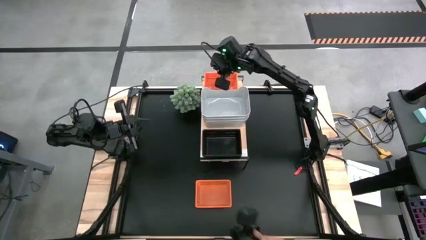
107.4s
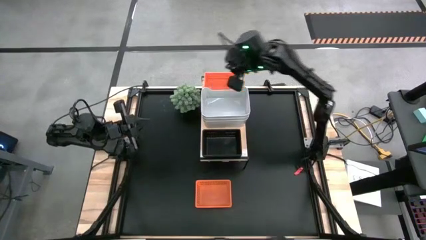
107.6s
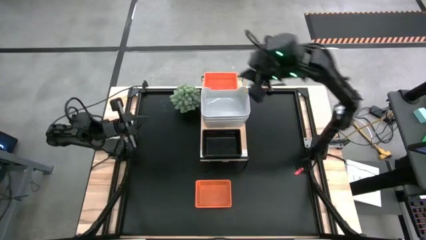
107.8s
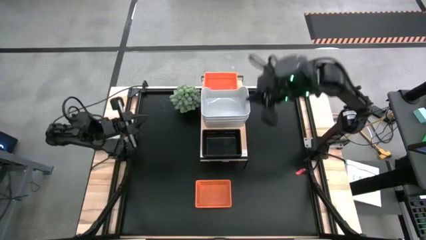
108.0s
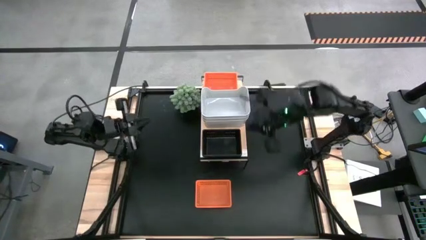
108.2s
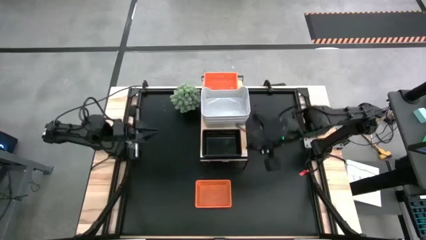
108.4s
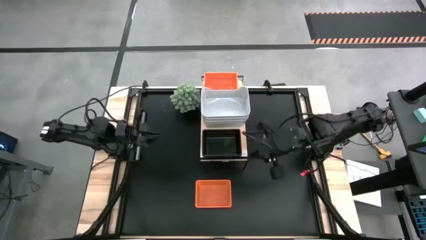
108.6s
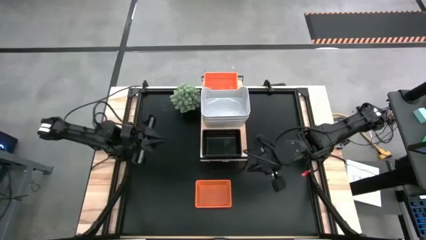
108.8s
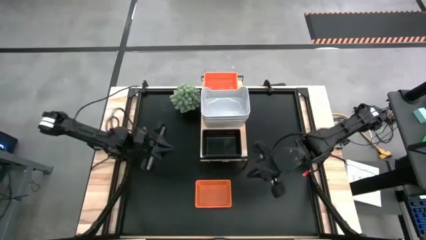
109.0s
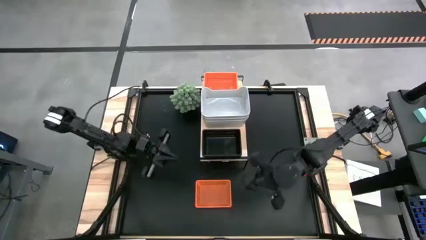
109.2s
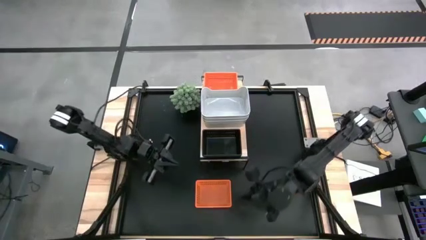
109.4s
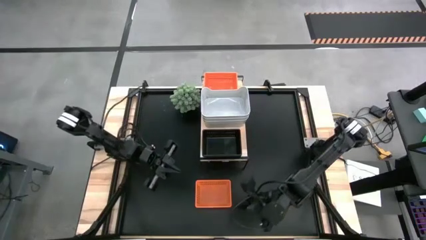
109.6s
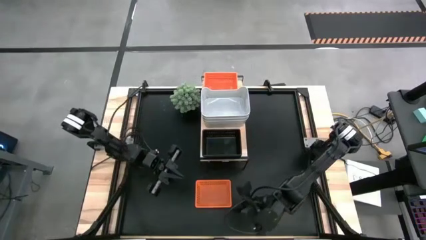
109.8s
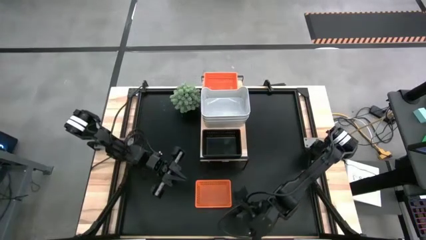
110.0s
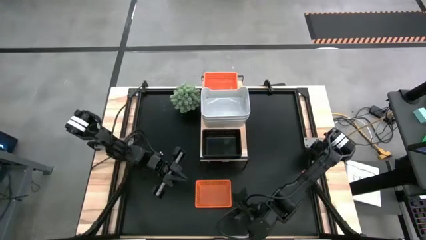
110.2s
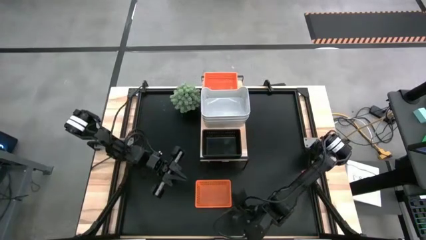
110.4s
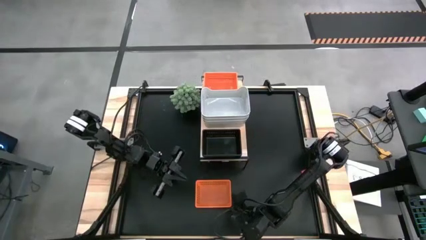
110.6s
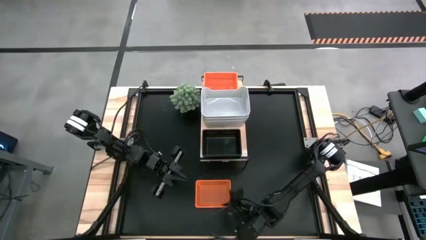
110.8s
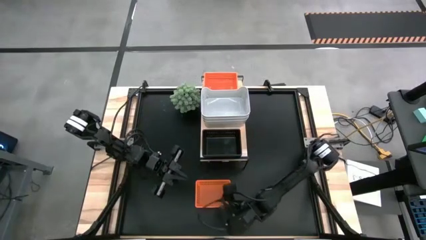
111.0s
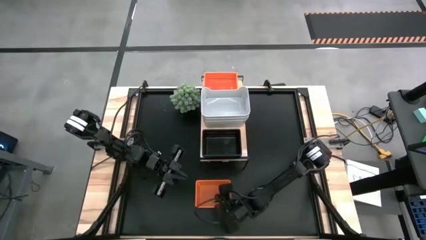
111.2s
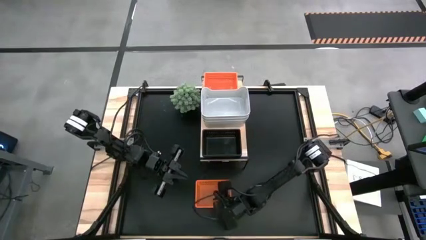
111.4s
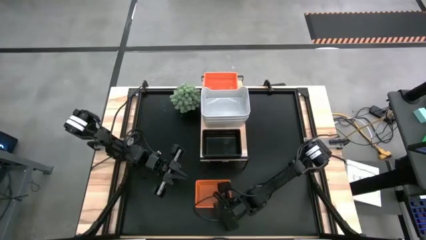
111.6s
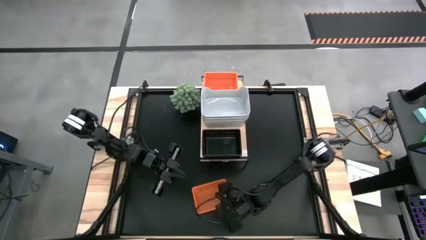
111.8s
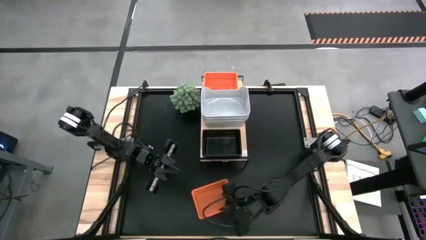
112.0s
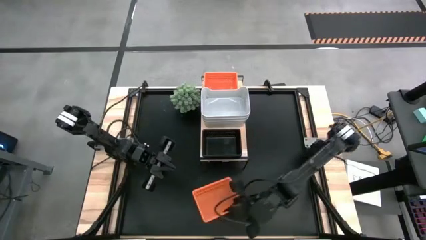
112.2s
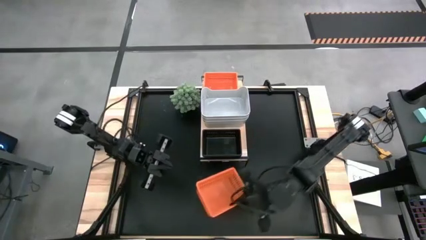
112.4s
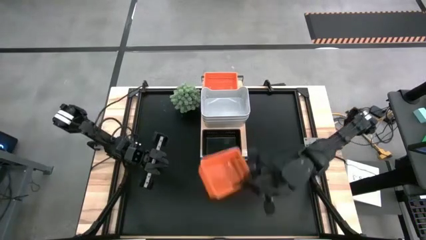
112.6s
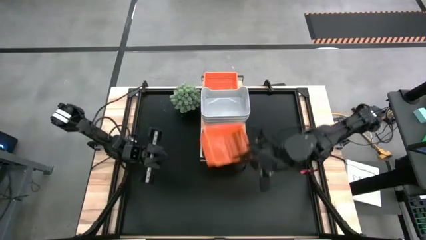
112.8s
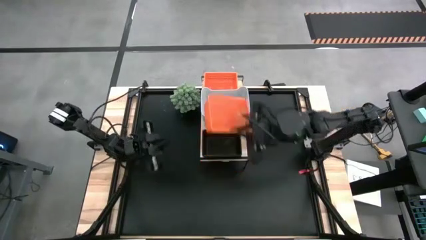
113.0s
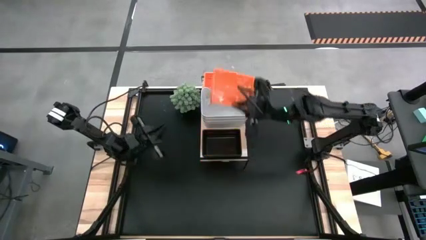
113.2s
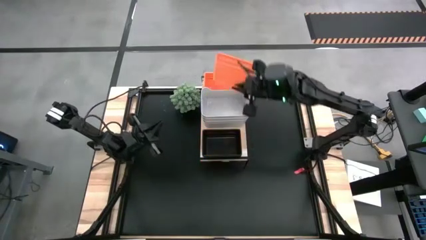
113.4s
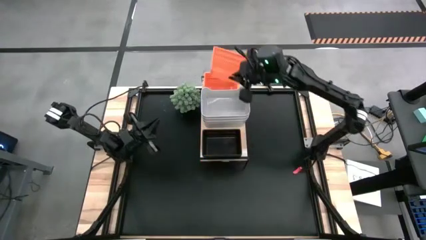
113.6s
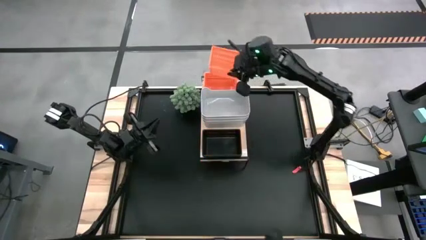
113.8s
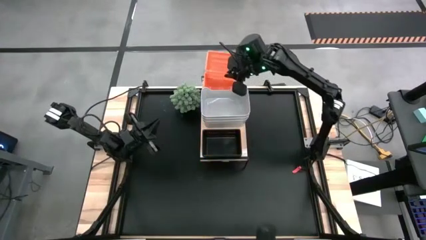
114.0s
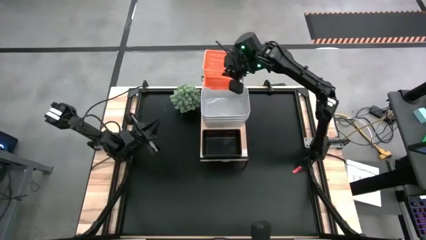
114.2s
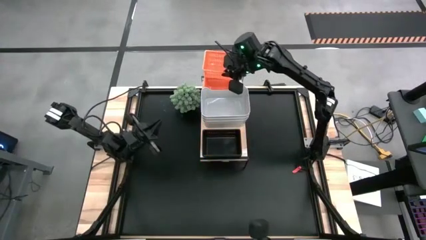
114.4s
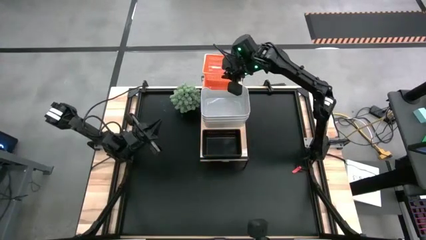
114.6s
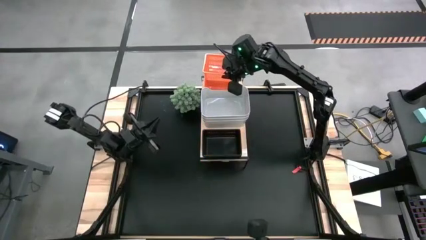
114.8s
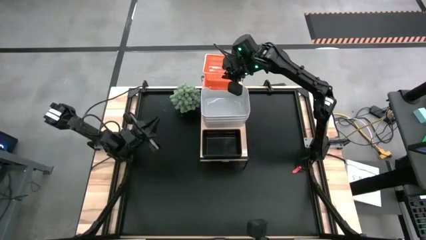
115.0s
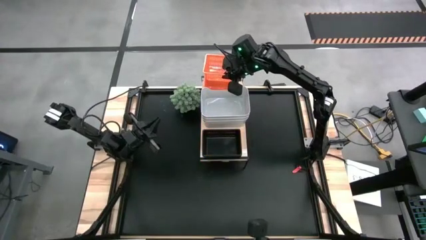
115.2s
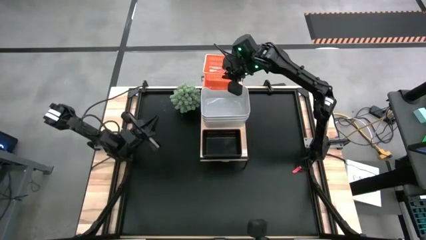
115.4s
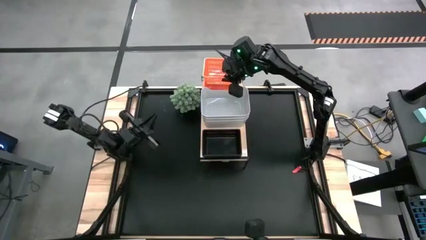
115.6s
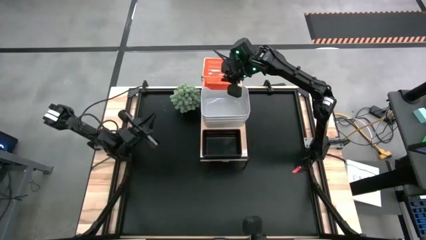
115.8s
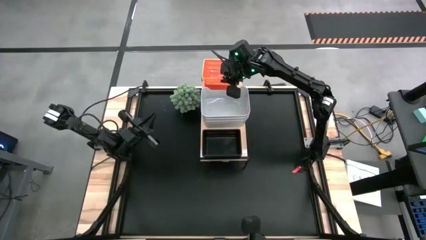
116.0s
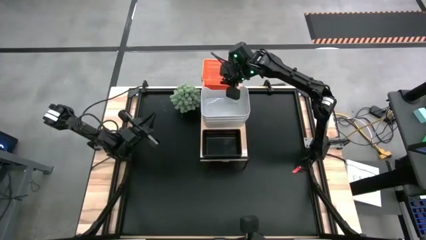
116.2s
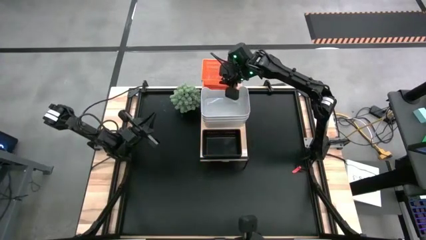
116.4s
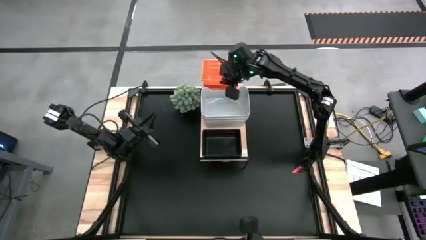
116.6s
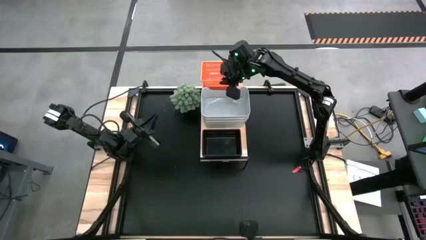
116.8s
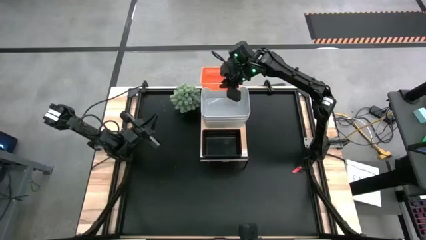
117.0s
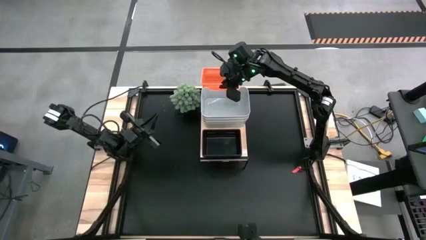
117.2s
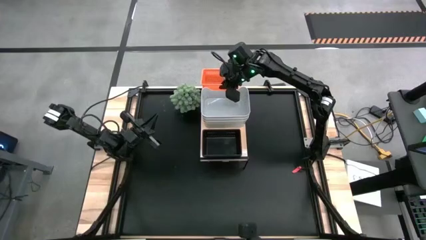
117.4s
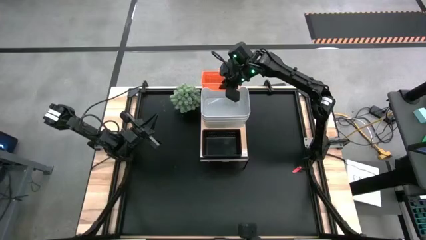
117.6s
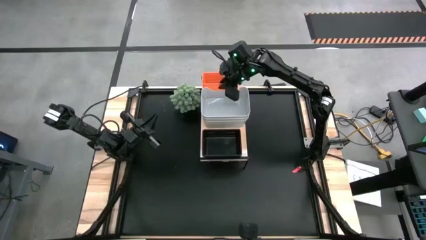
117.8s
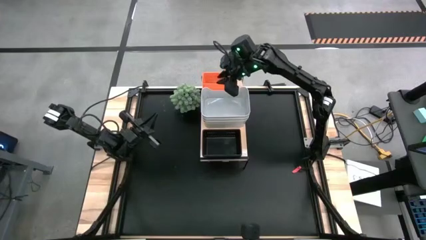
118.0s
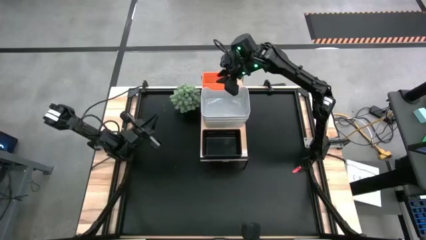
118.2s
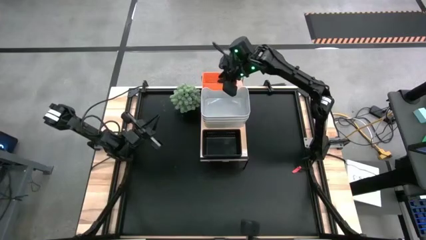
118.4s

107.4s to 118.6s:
Task: Stack baskets on shelf by color
Stack the orange bin into the orange bins on the shelf

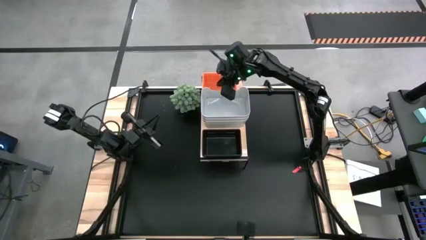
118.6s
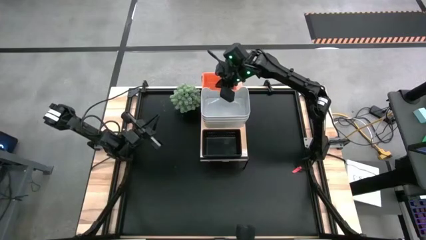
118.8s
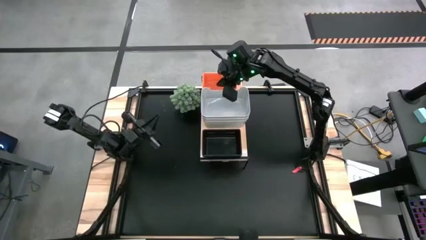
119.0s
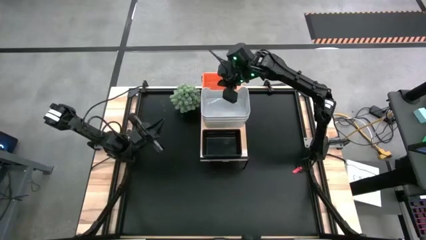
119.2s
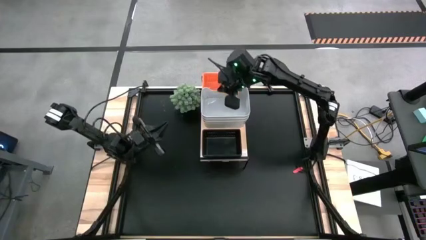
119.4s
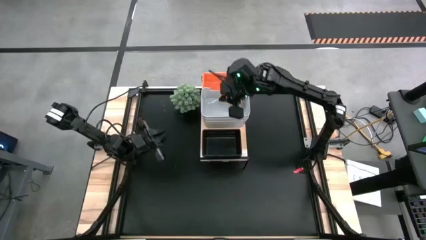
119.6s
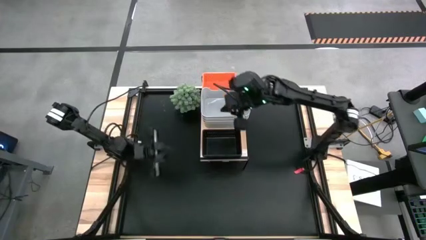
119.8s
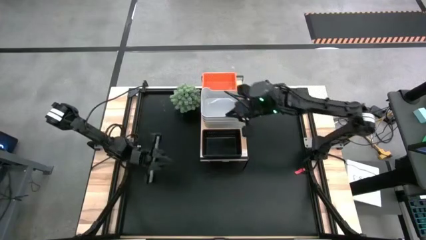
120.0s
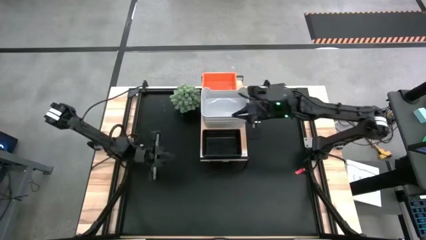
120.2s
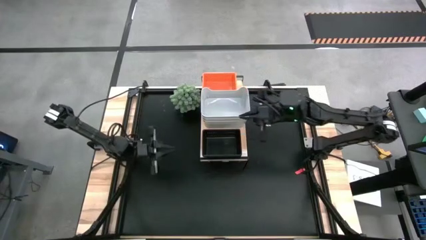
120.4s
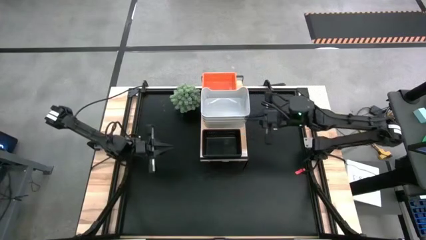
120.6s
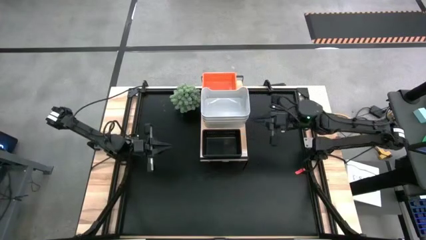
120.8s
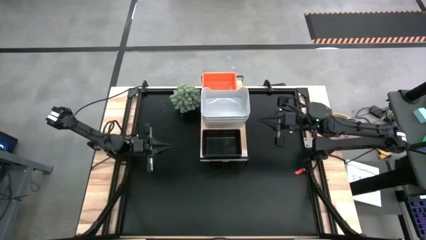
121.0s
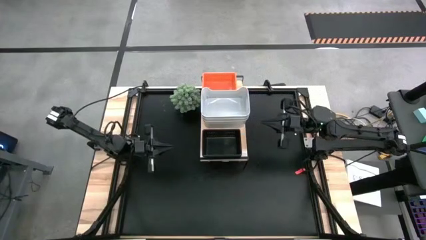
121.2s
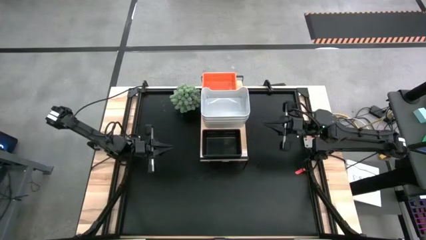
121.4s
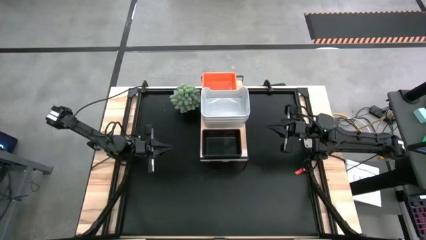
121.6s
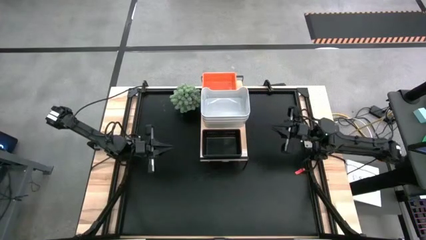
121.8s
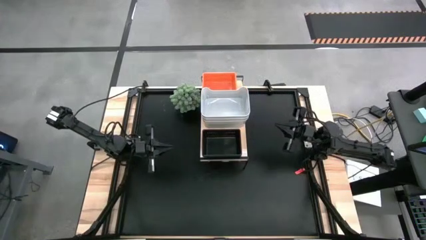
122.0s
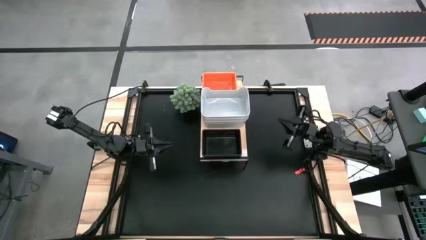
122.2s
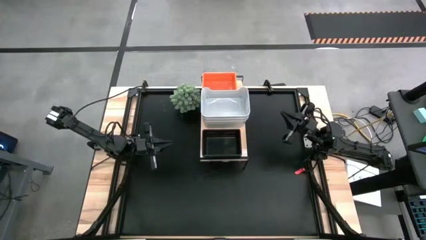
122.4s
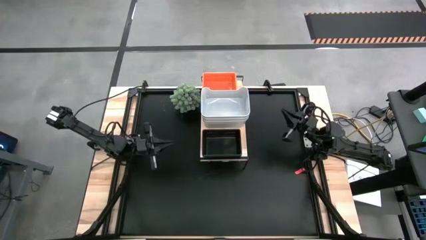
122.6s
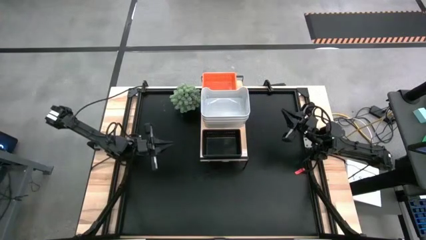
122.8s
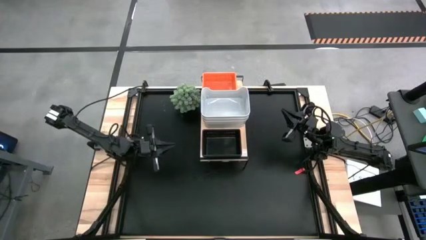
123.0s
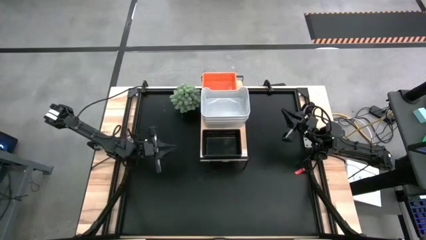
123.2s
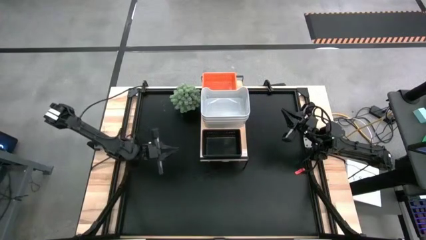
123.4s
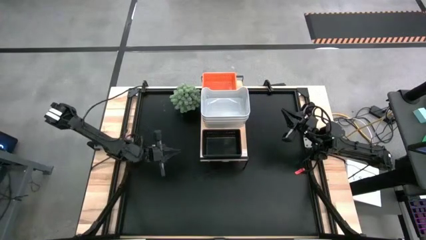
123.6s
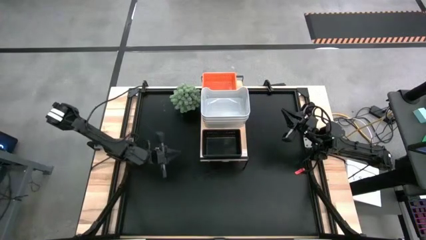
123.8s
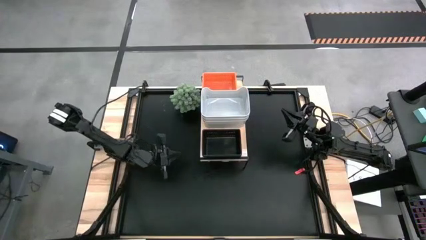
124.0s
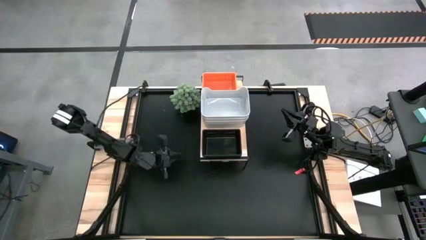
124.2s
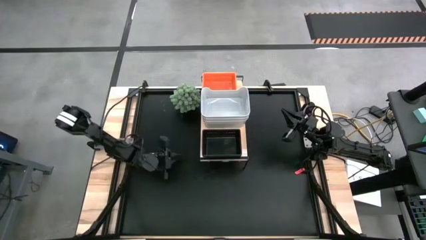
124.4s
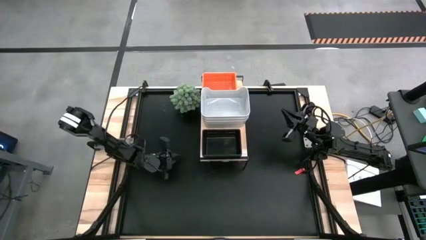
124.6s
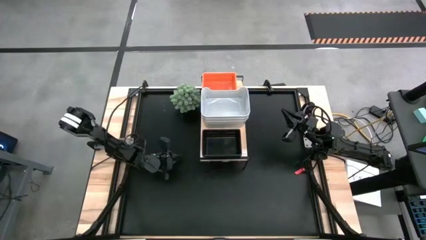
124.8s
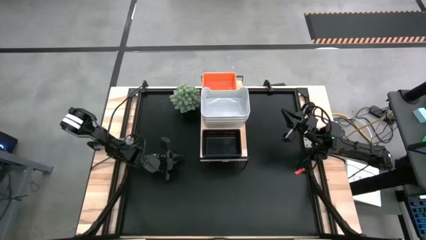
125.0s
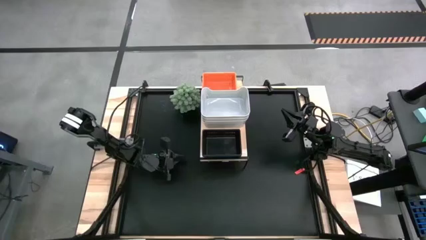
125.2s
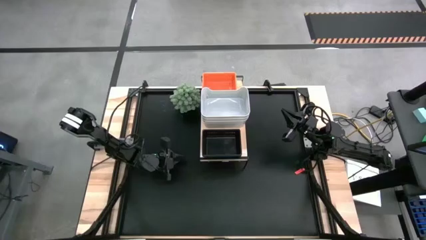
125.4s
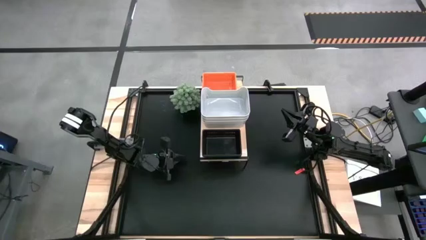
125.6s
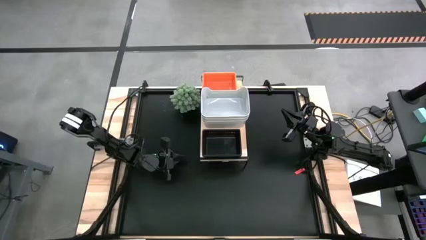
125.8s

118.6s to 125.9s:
Return to Home Position
